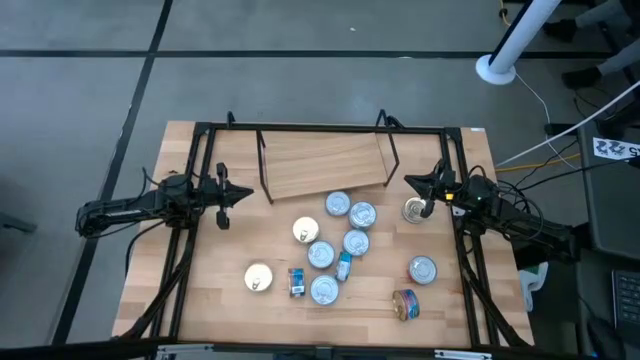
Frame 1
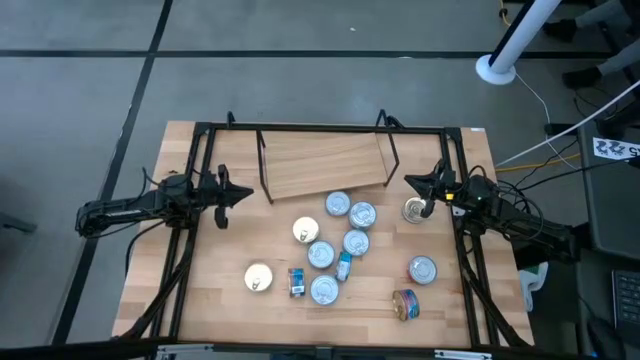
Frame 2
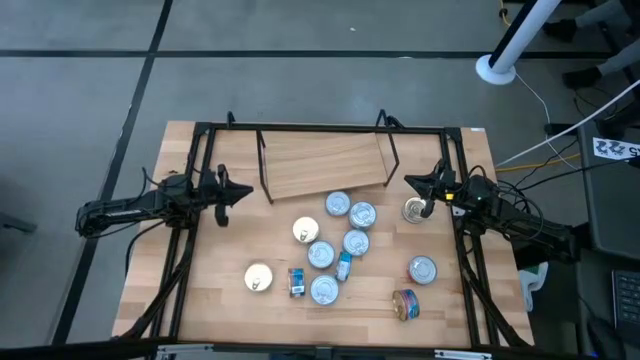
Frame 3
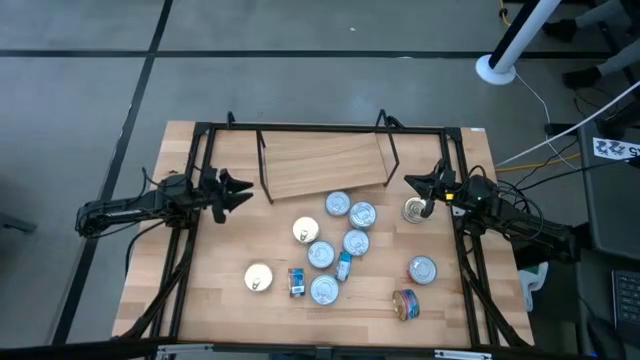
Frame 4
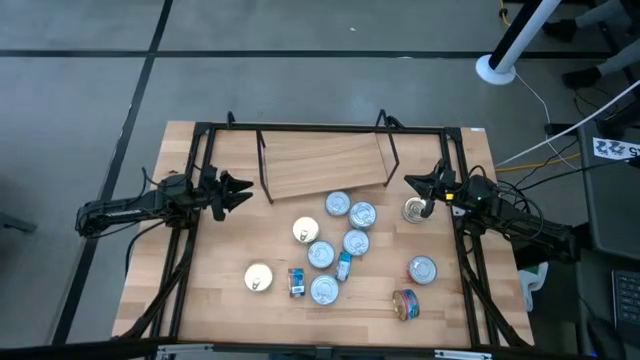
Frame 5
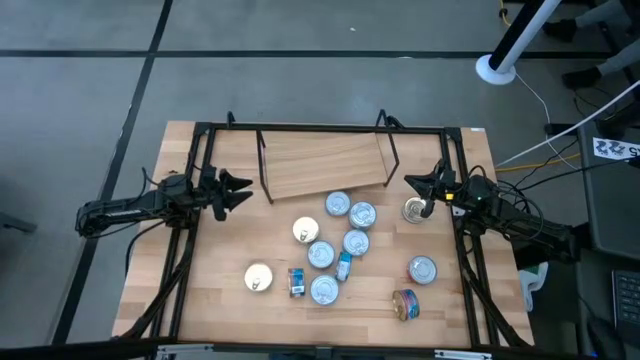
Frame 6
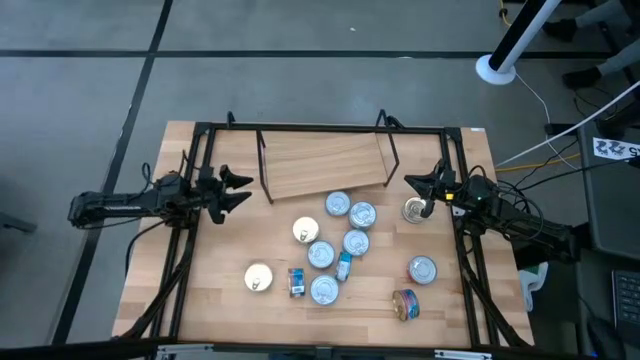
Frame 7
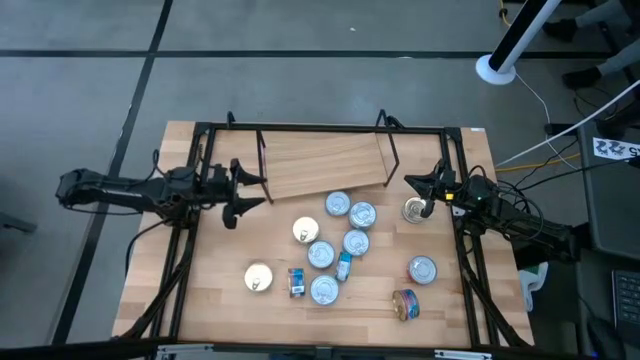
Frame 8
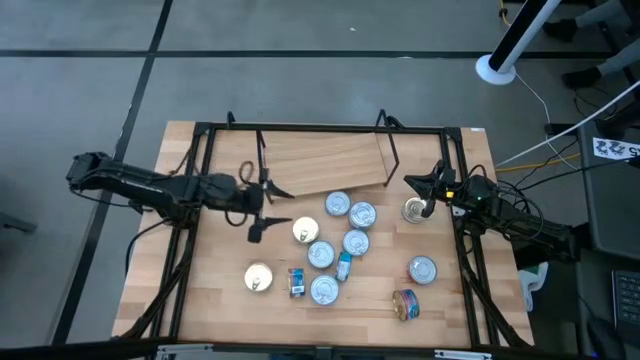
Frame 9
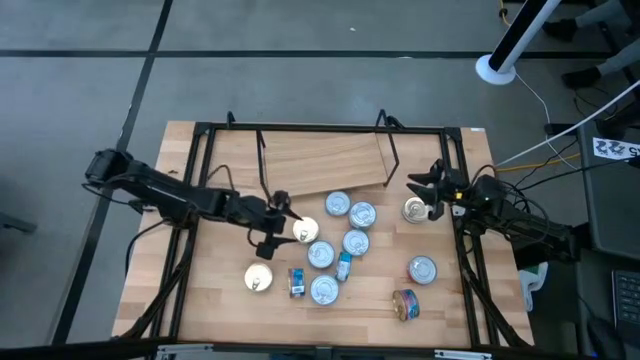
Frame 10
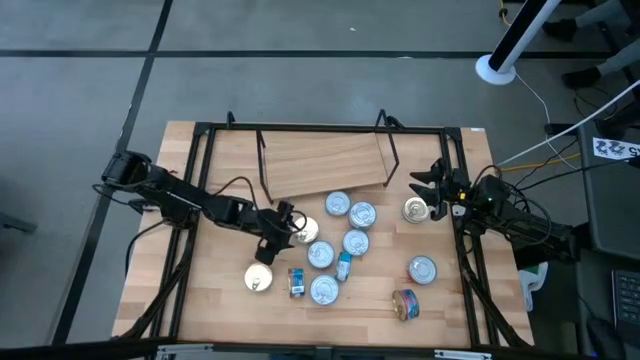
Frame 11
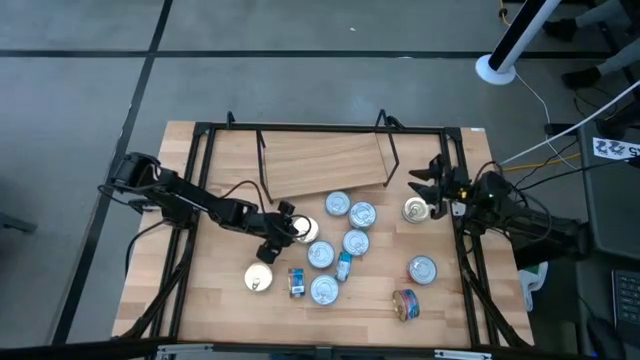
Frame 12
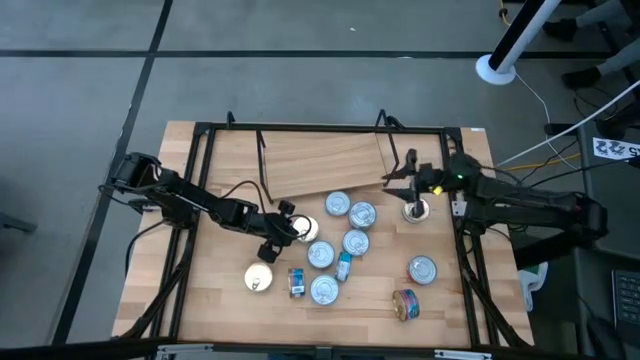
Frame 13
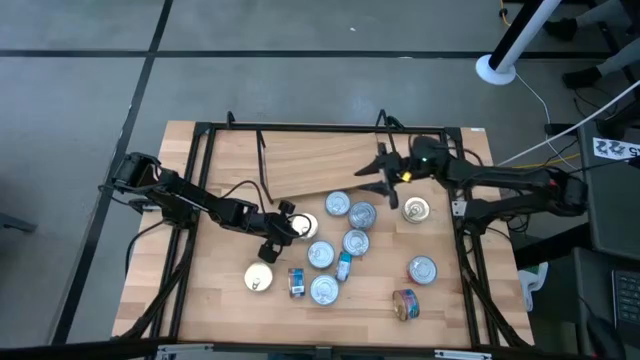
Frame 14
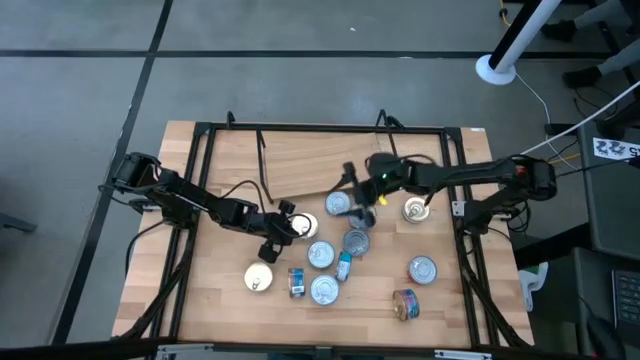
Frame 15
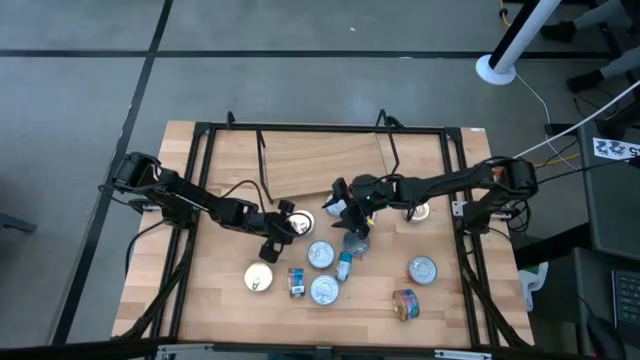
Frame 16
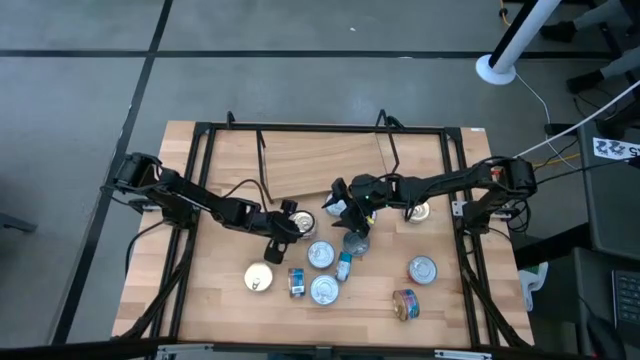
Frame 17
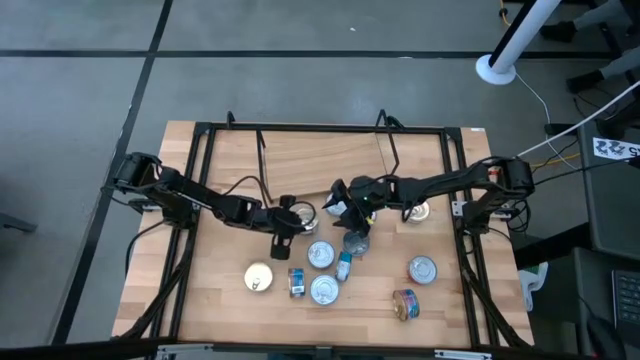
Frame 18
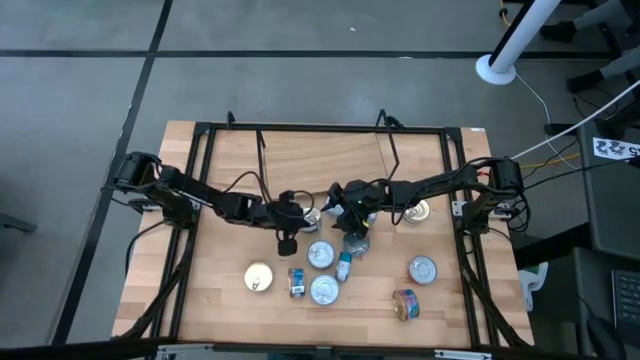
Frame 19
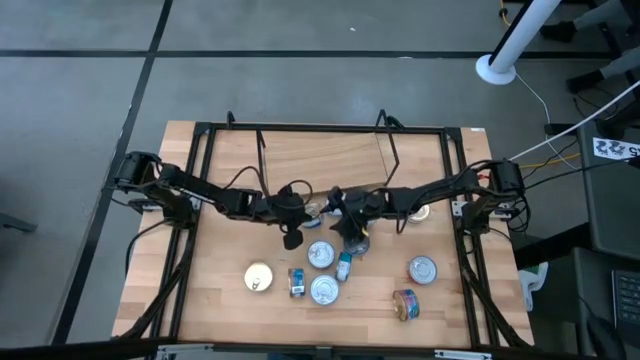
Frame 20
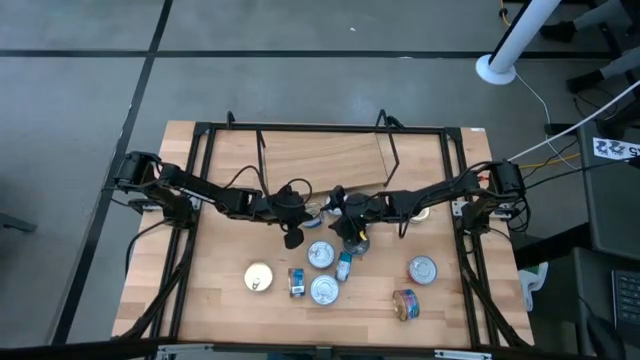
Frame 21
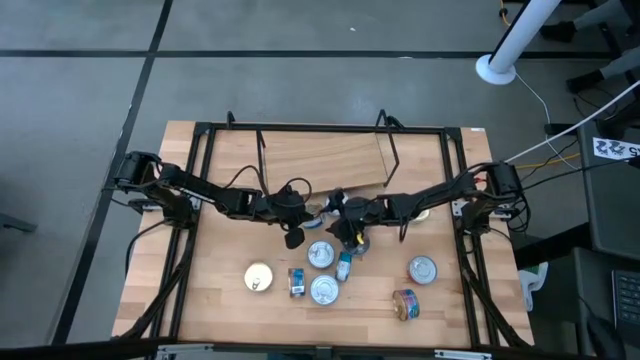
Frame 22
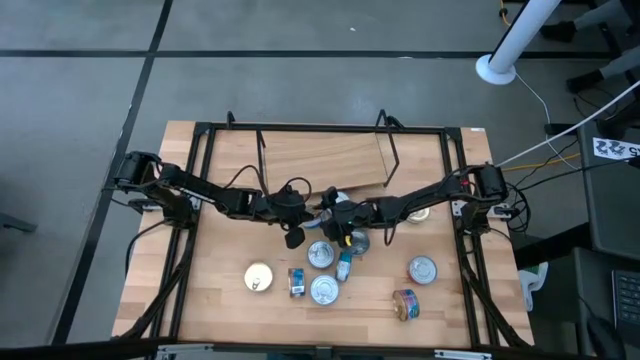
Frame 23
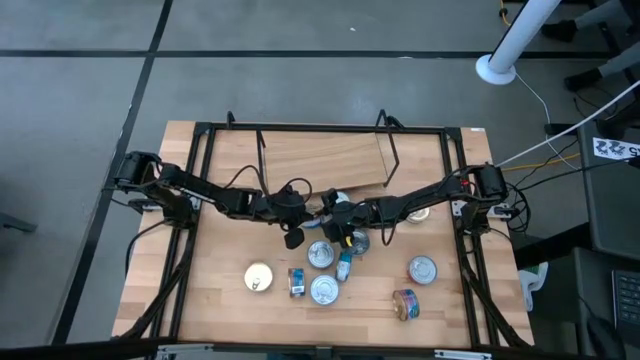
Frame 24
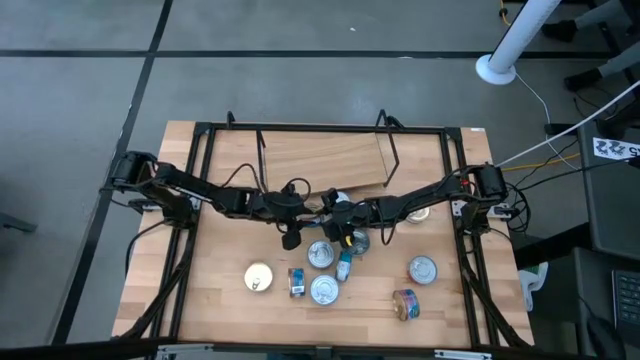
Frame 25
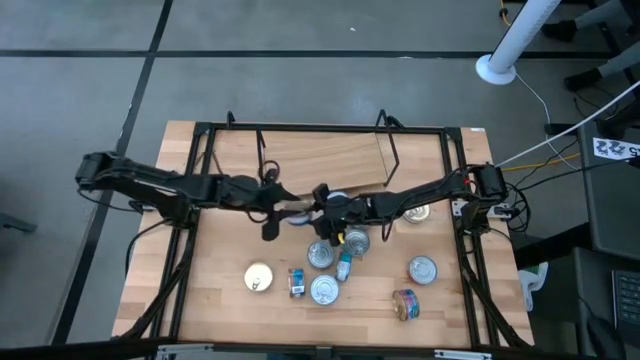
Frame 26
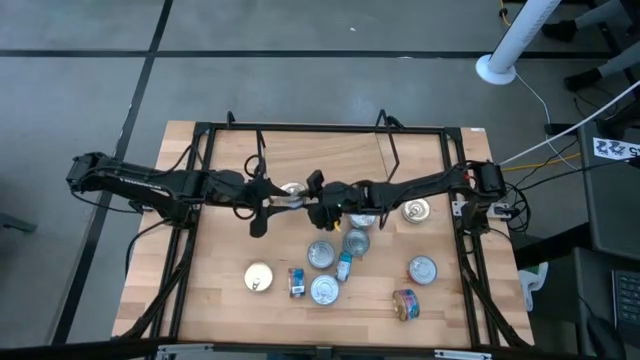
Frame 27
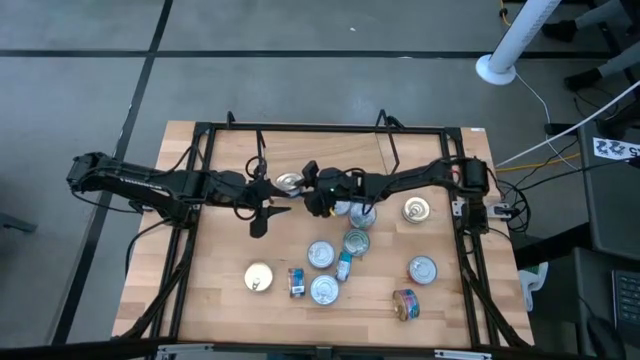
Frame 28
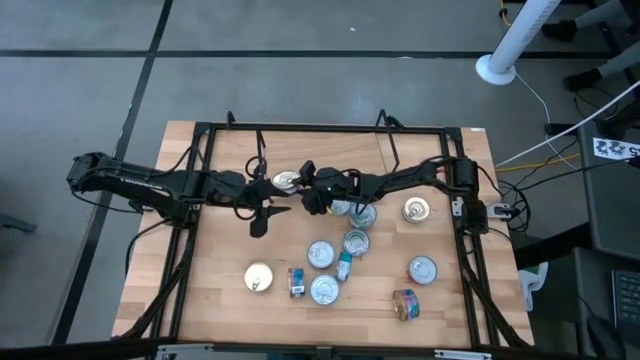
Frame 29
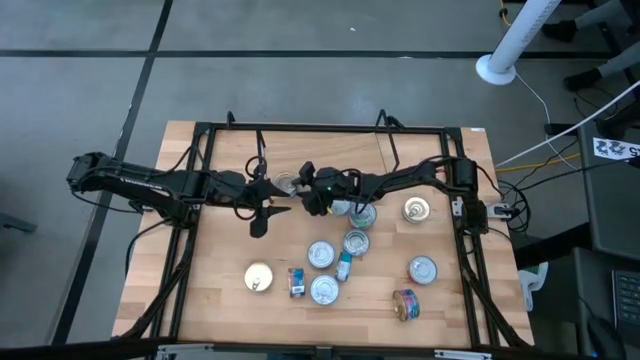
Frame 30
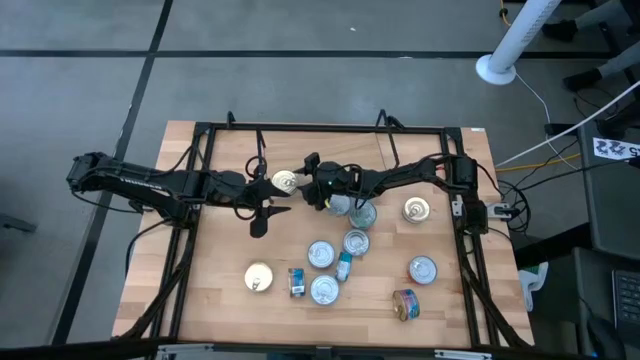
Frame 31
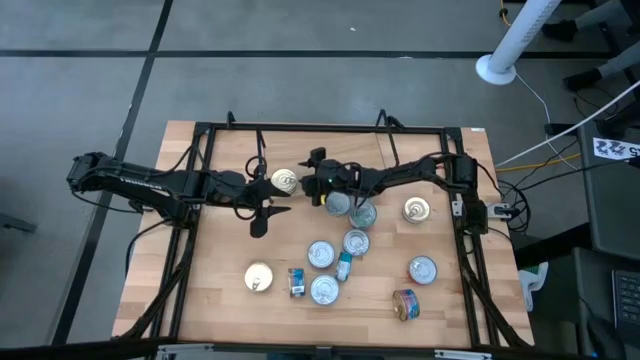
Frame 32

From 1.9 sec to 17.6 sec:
Task: Stack canned seafood by type on shelf
Put the blue pink tuna can on the shelf
